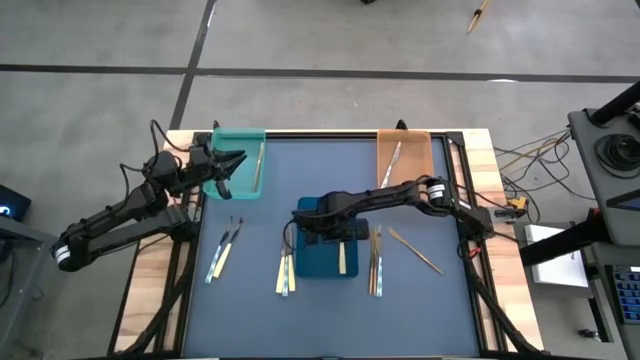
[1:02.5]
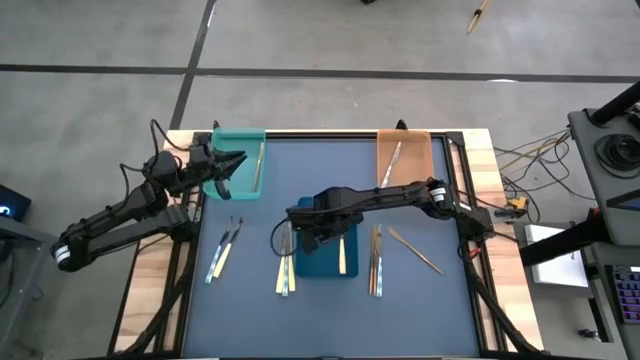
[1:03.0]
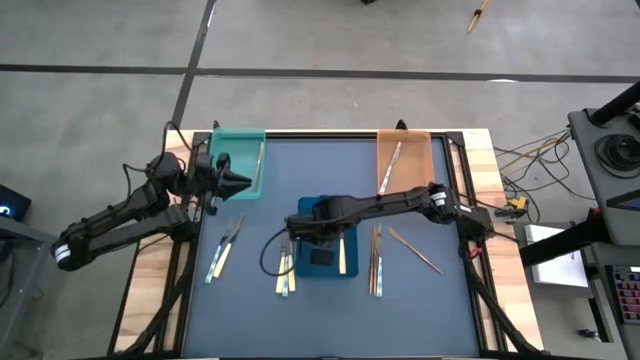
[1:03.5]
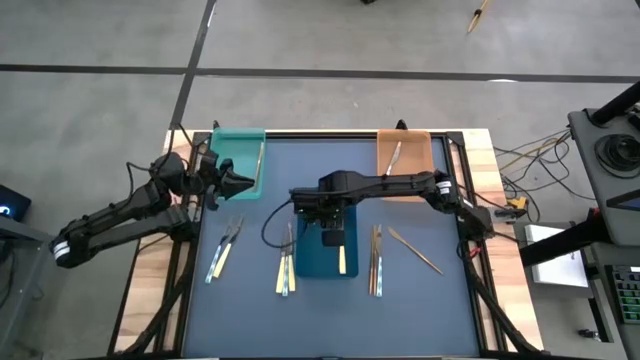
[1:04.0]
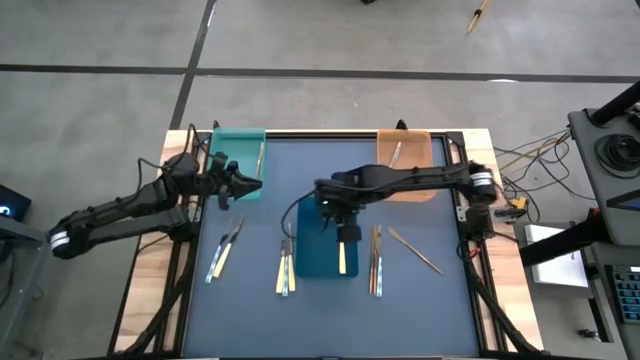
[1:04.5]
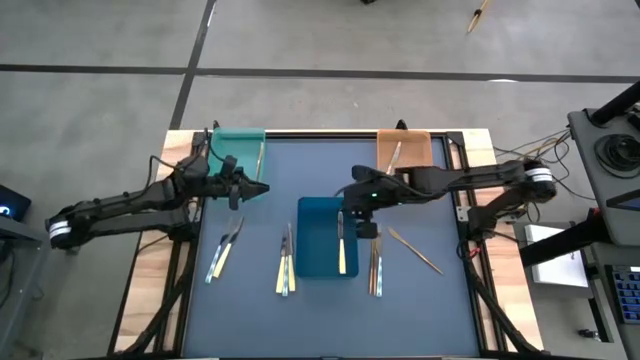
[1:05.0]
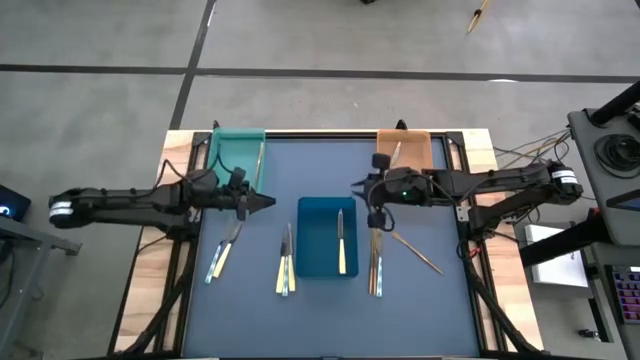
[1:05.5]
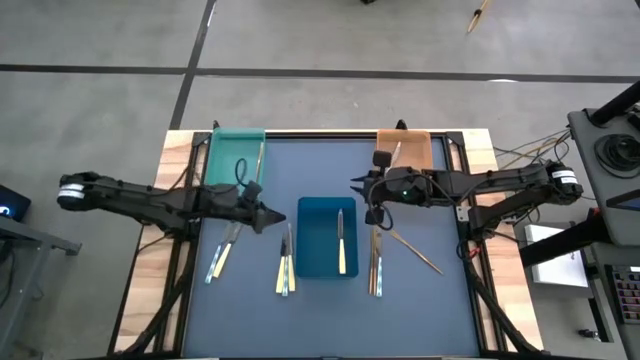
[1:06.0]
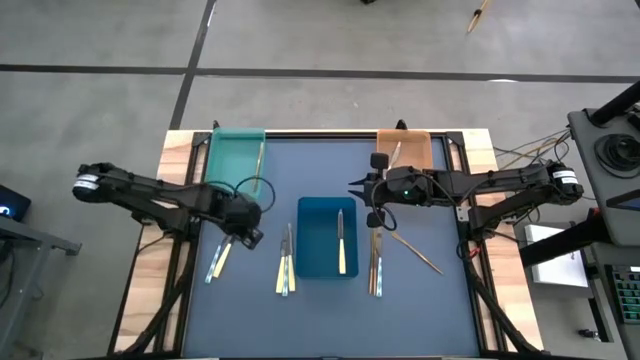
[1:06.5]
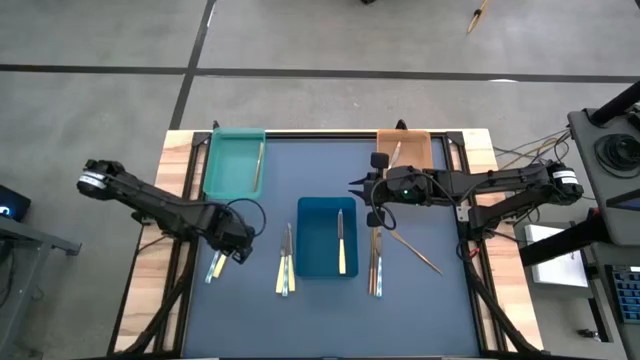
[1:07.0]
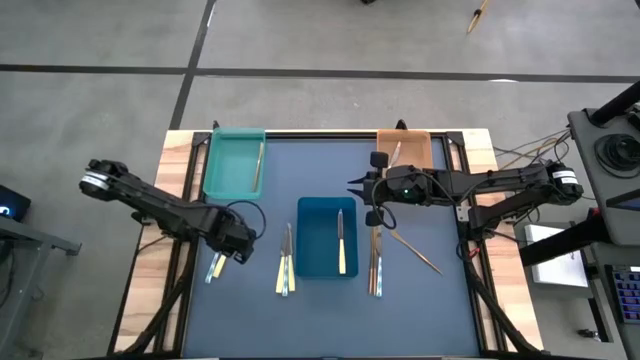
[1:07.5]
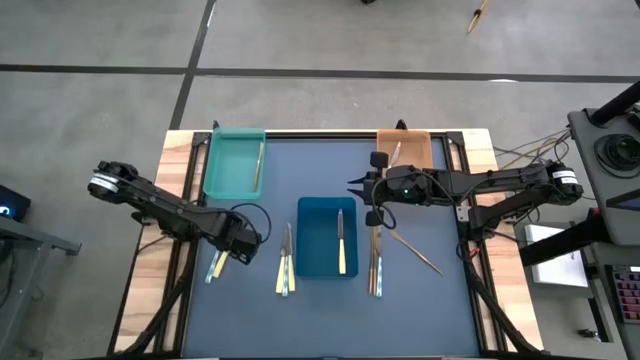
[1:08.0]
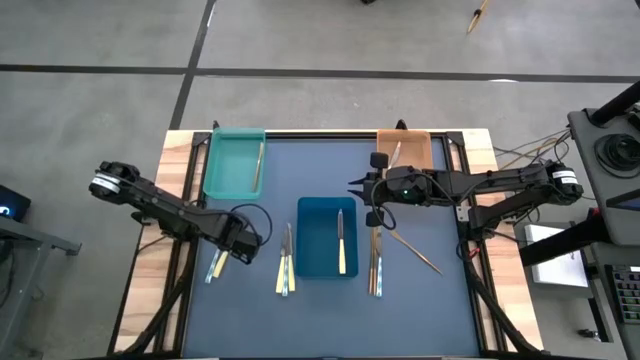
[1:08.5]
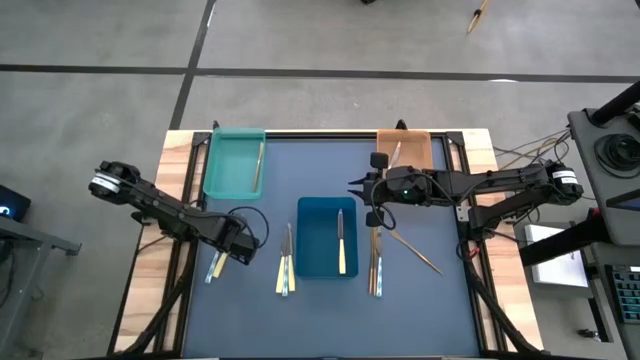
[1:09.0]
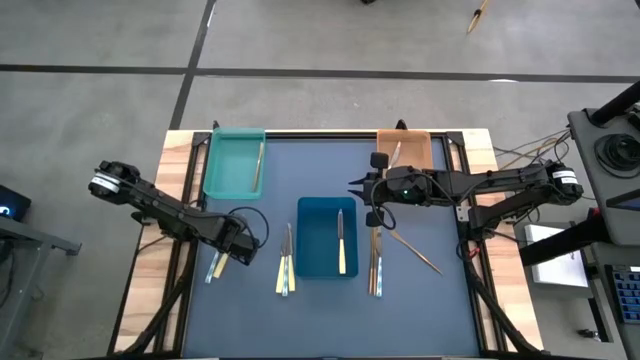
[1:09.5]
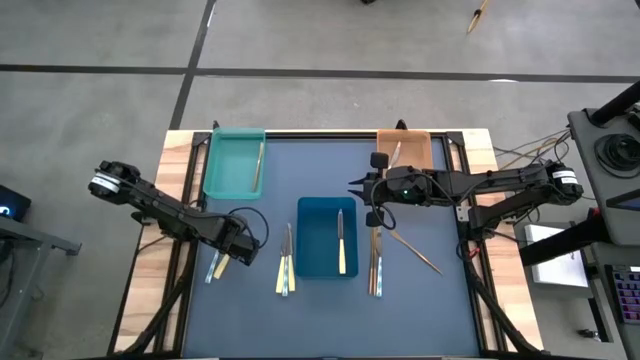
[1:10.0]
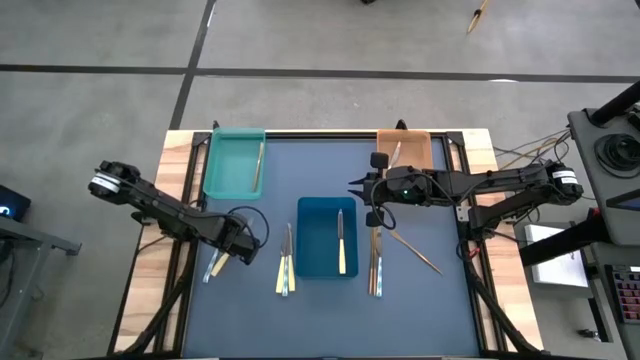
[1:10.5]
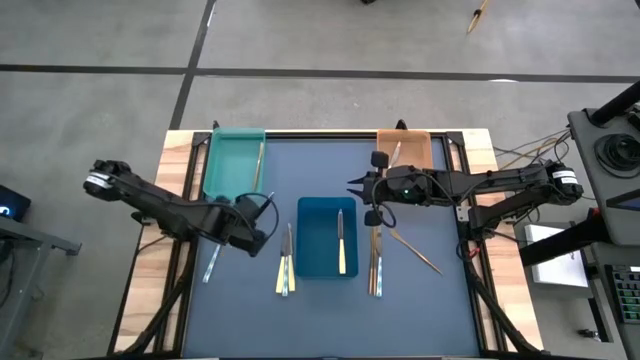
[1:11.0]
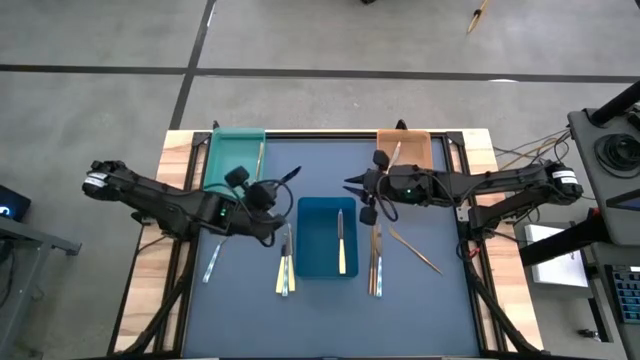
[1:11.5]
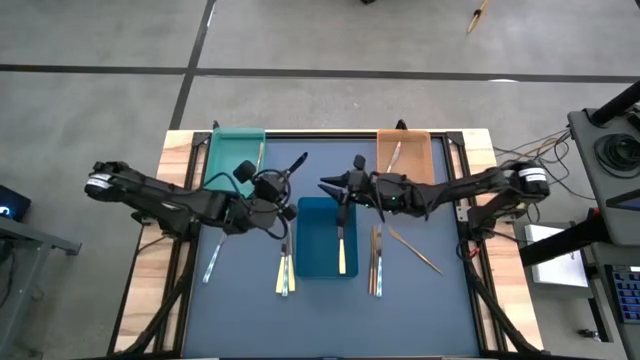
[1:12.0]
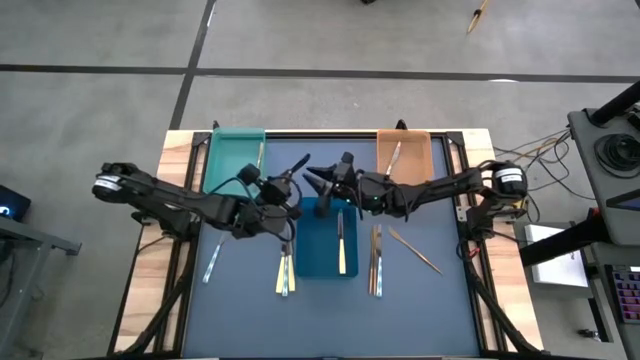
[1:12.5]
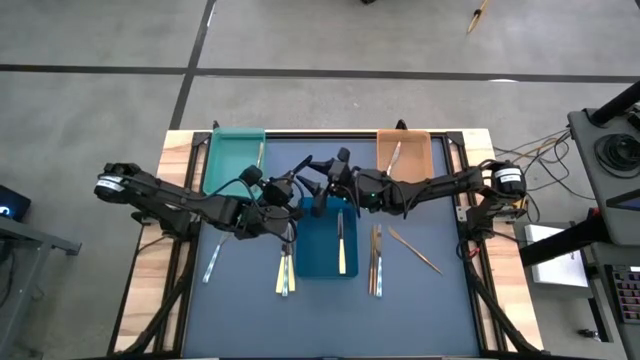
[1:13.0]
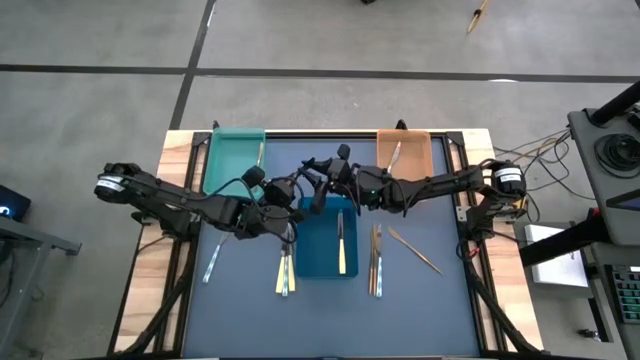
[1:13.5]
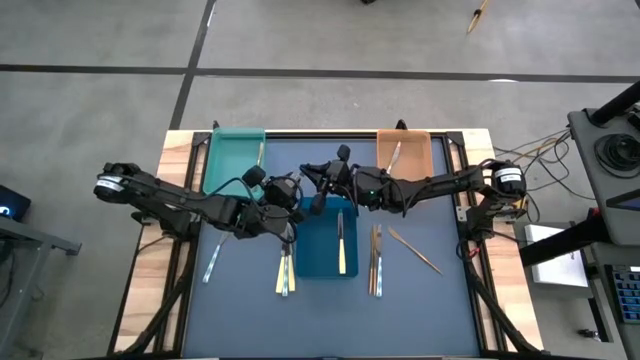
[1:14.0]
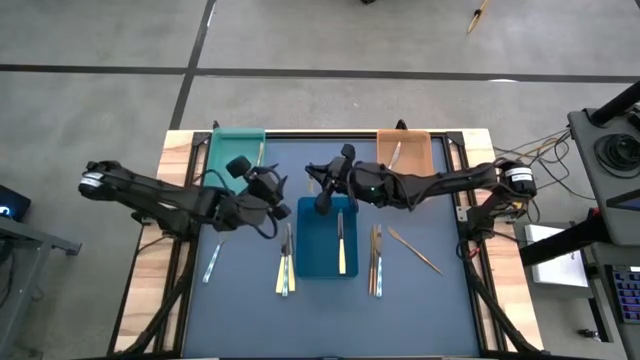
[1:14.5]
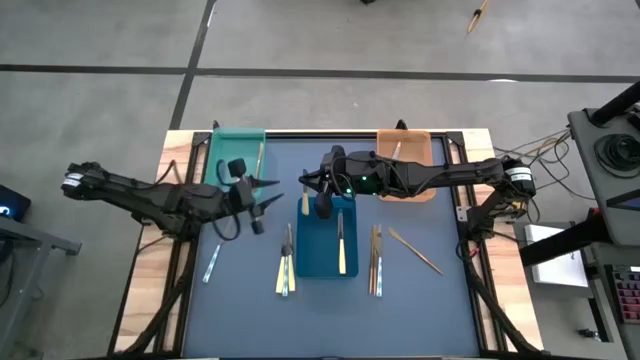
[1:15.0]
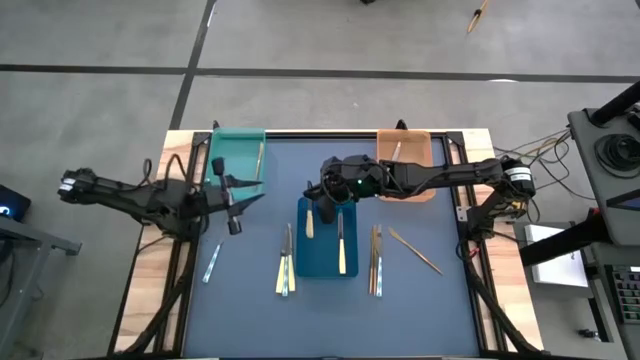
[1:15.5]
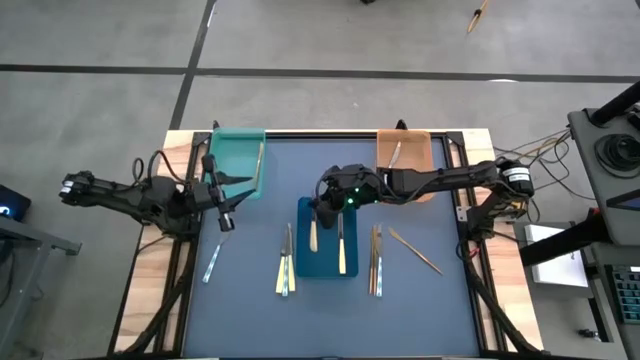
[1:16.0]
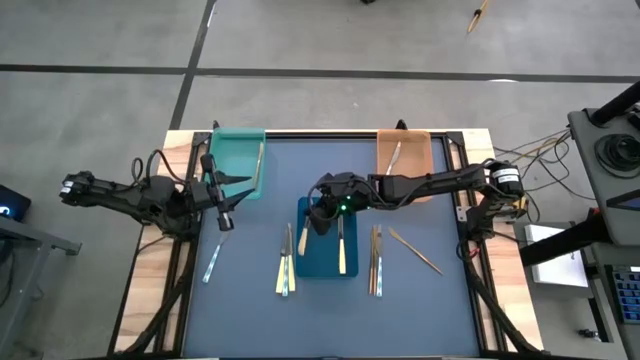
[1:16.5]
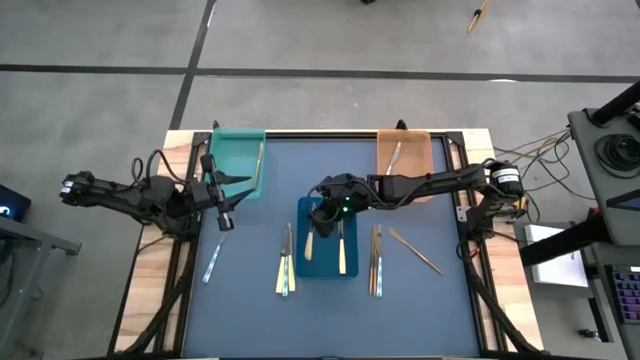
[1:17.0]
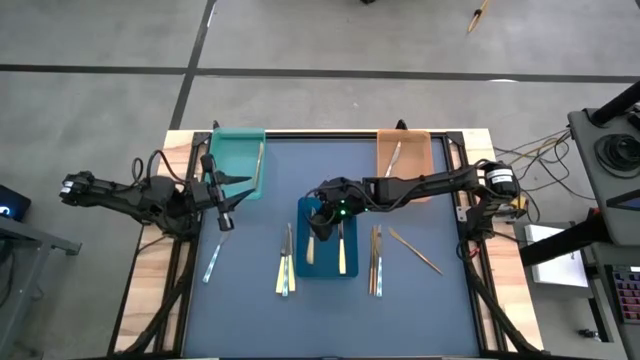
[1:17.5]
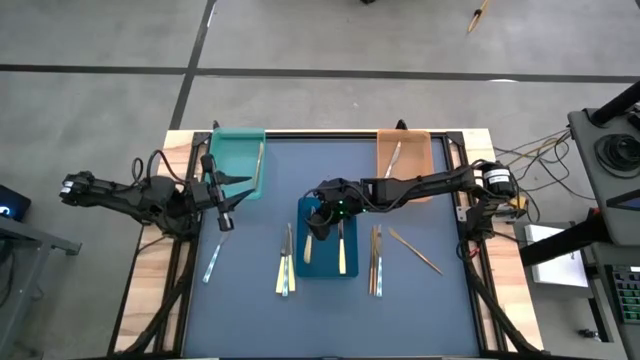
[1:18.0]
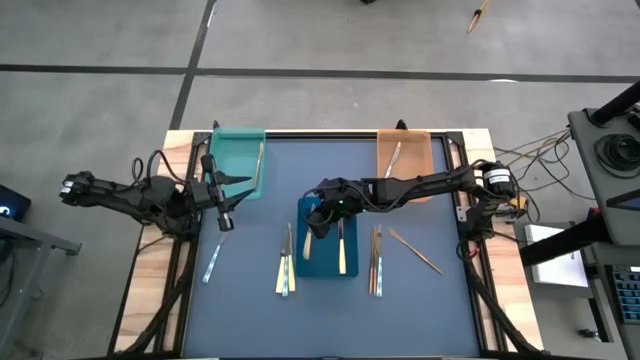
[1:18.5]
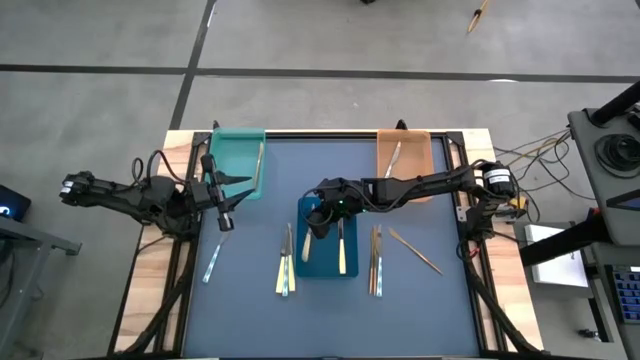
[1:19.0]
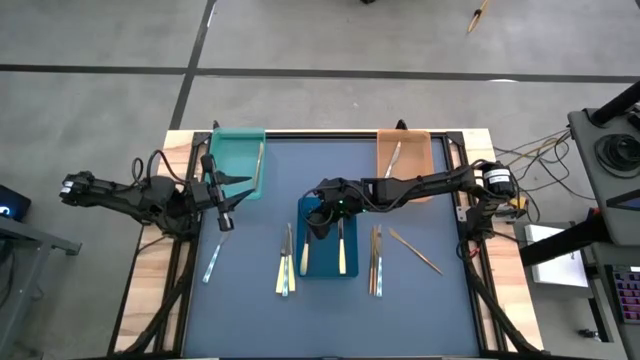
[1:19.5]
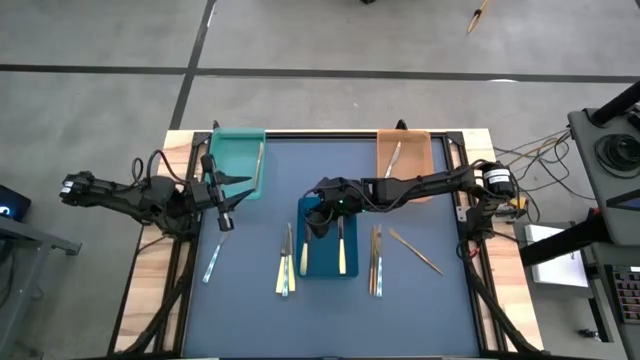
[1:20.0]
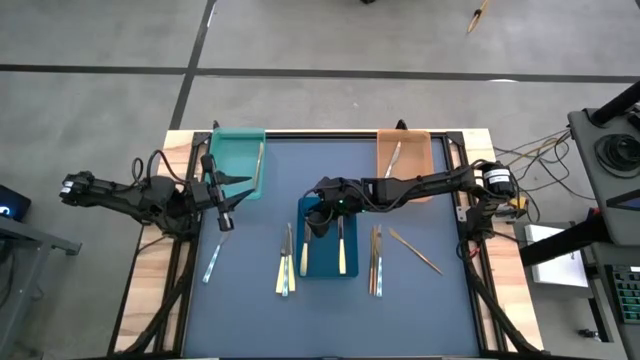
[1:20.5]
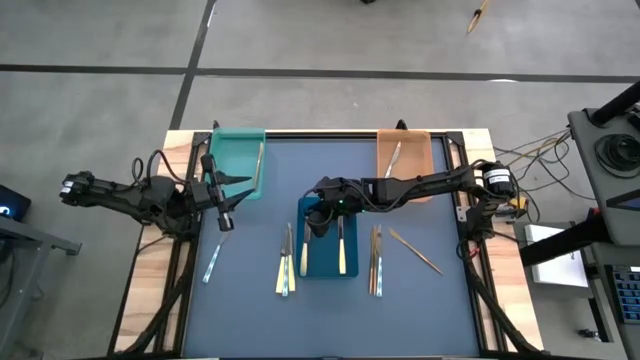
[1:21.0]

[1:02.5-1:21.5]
Task: Sort silverware by color (type)
Put the left yellow knife into the blue bin

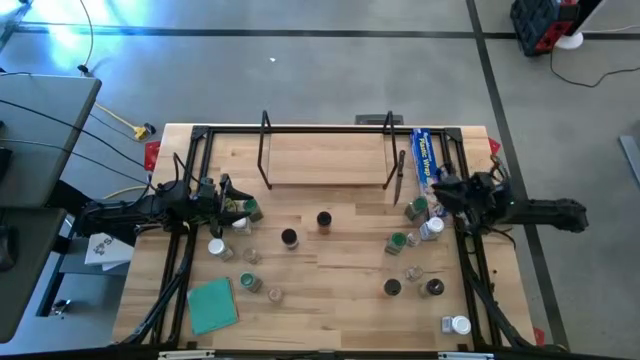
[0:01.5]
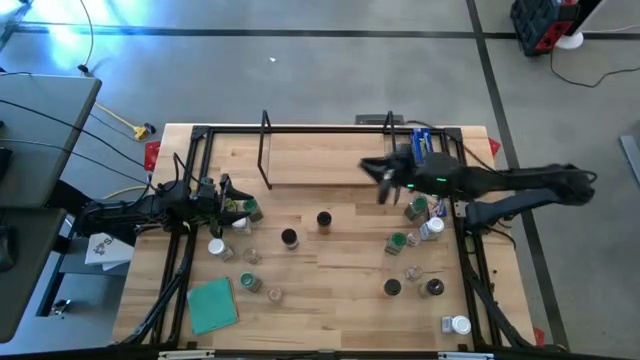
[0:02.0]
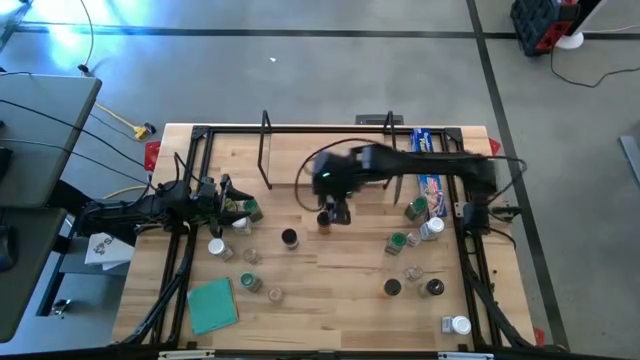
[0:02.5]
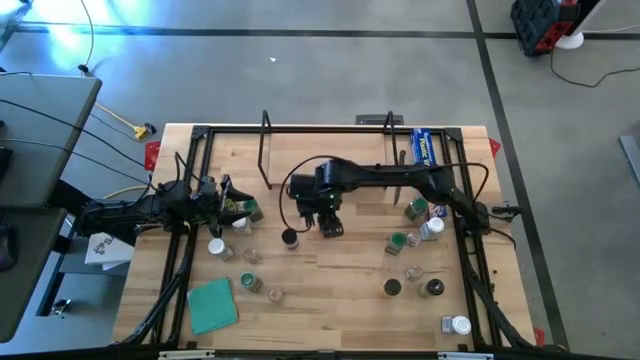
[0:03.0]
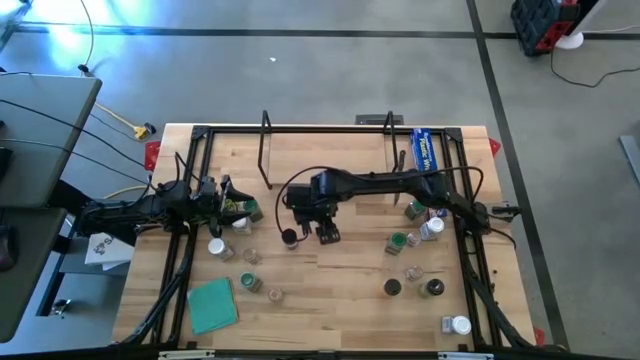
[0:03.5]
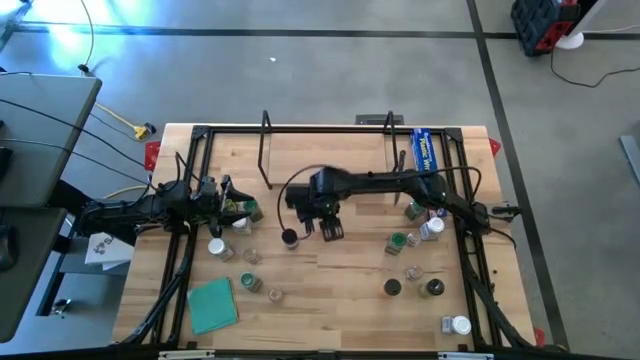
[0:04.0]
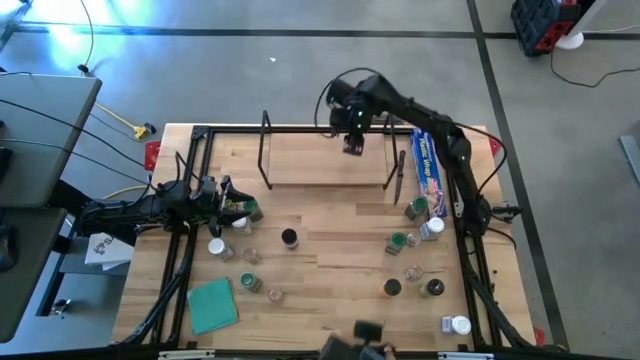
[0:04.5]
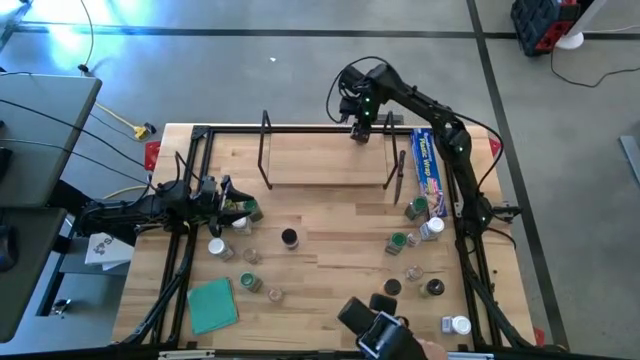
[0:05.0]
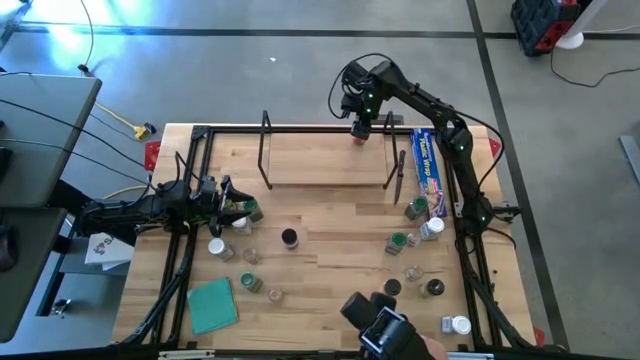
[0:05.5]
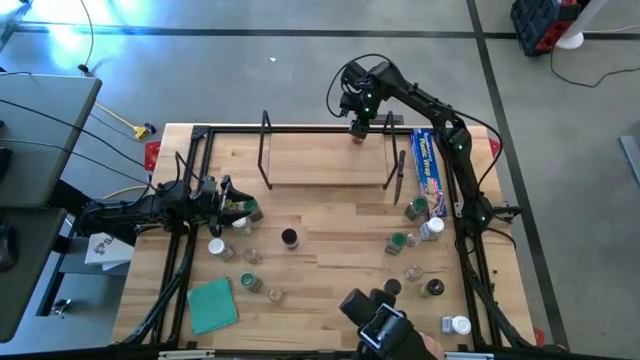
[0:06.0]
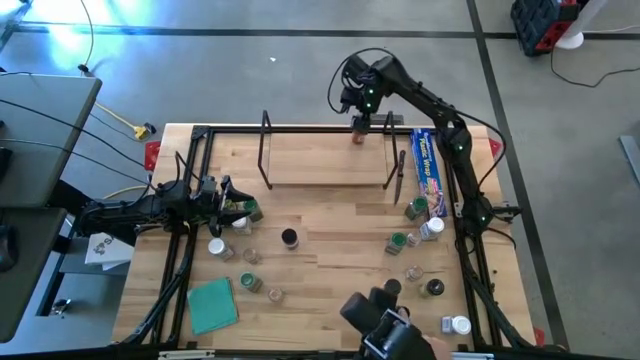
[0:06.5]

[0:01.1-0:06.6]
Task: Shelf spices
Put the black brown seasoning bottle on the shelf
